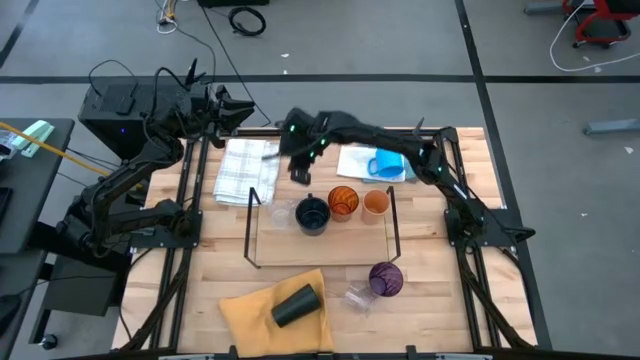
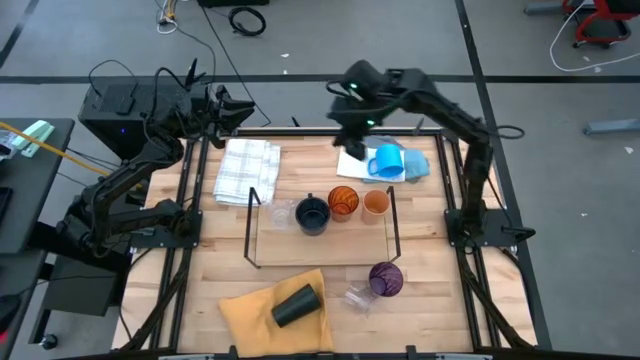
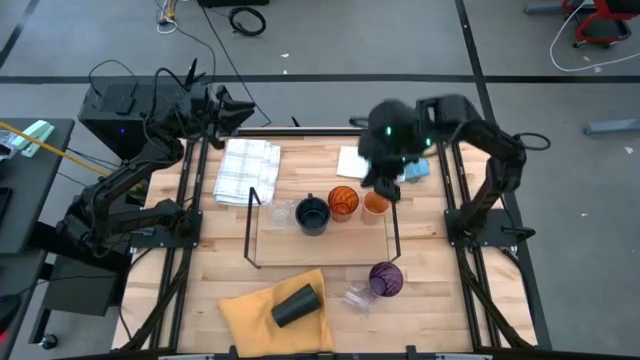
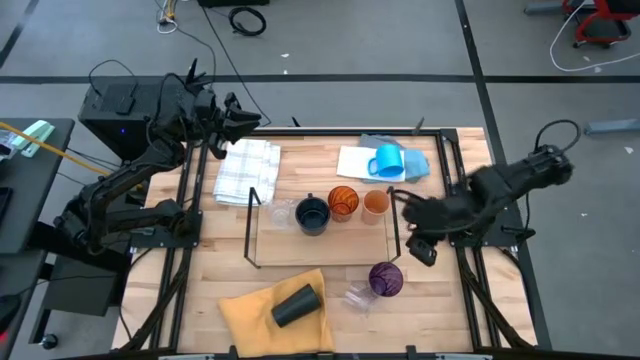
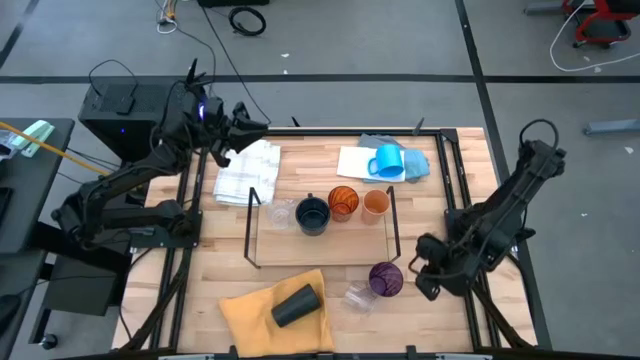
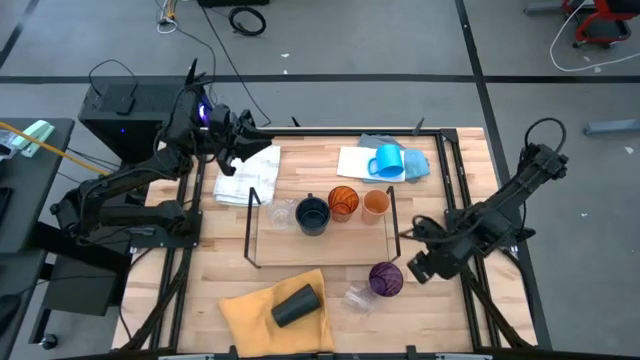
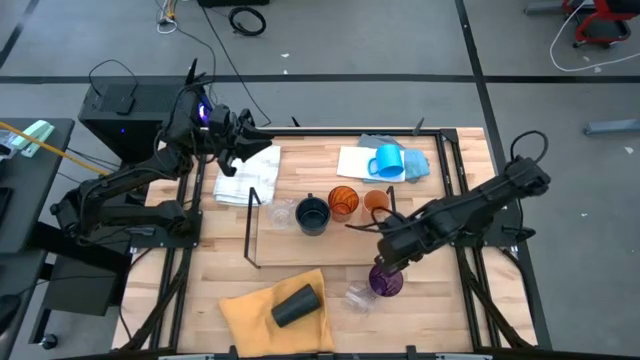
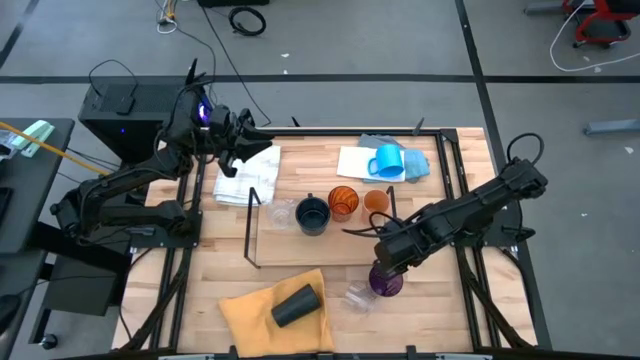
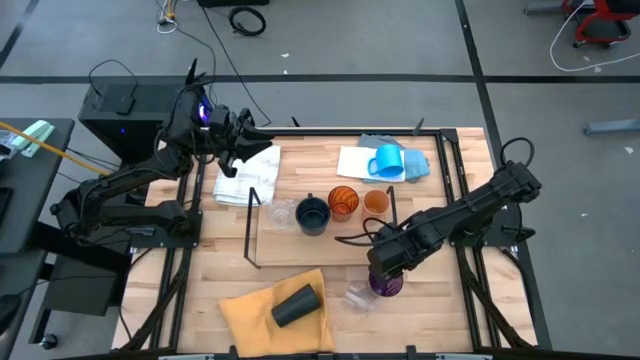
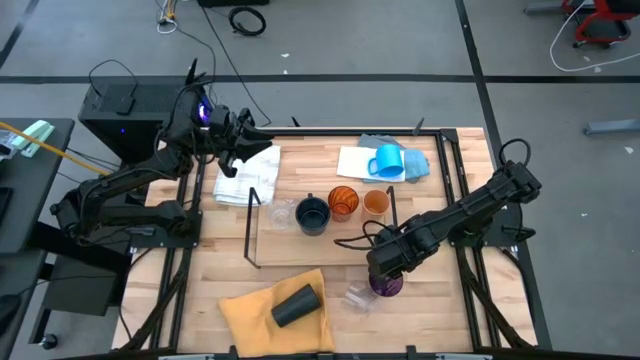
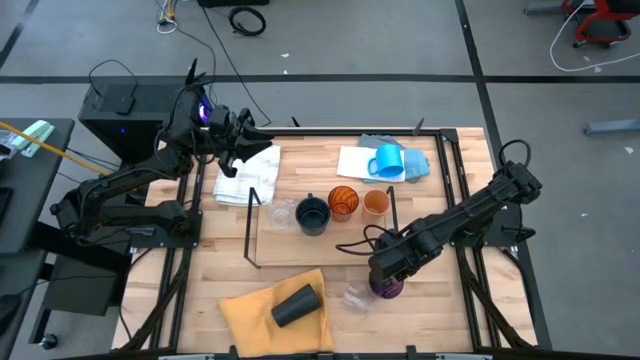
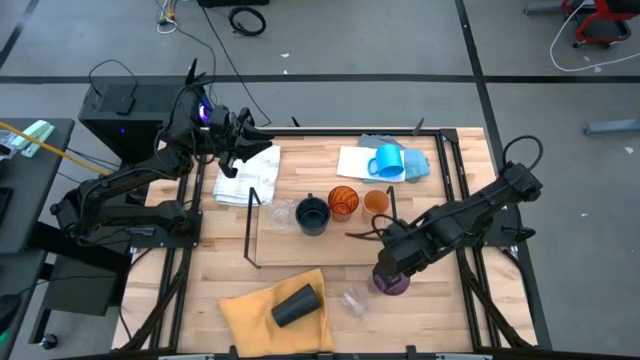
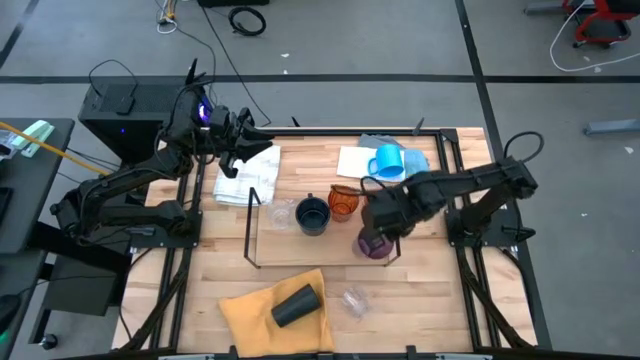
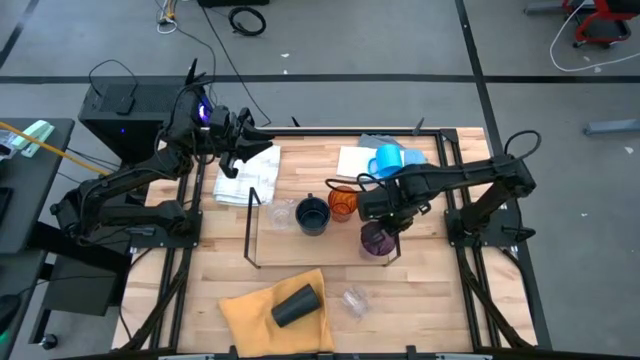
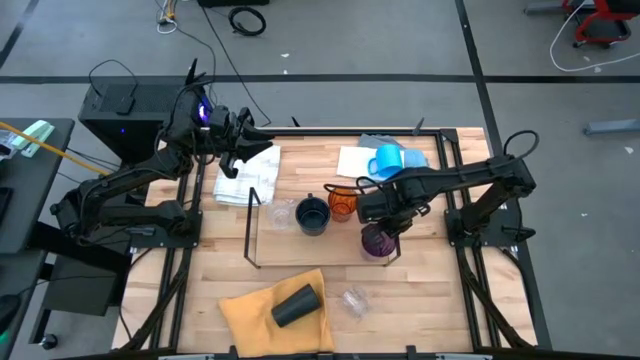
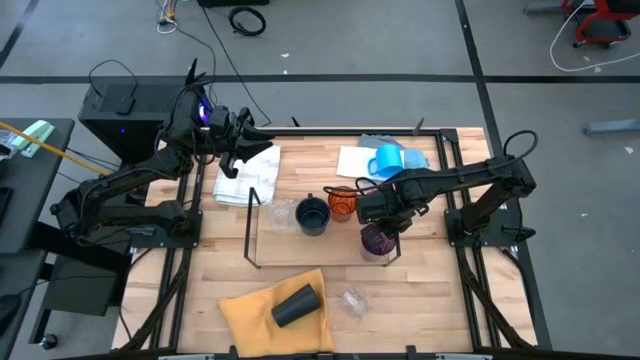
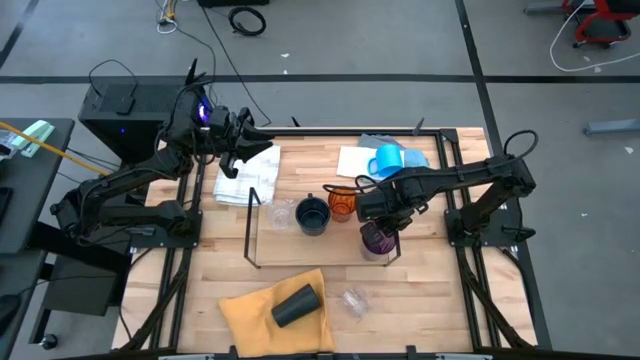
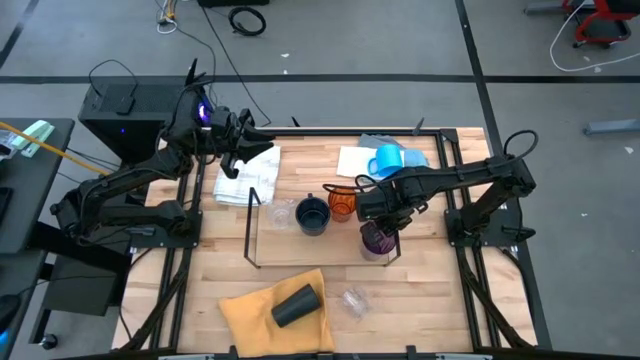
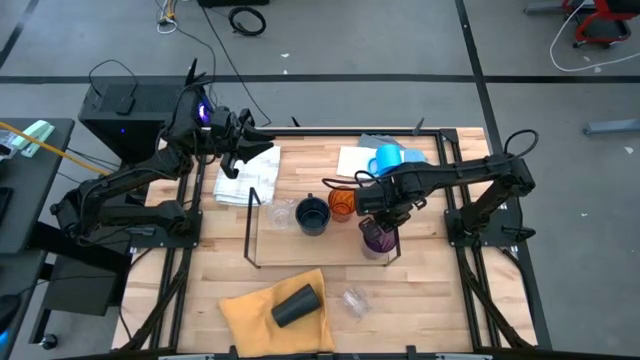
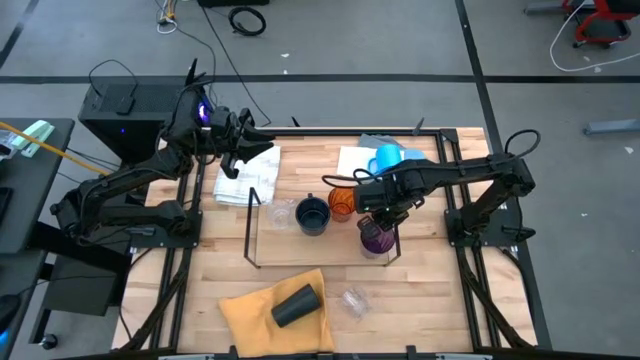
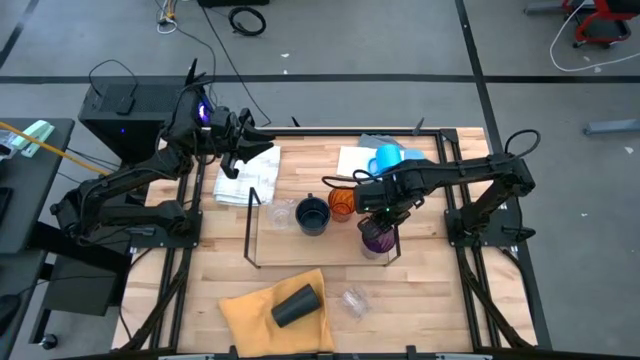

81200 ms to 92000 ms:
Task: Stack small to large cups/mugs on shelf
Put the purple cup on the shelf aligned with the orange cup

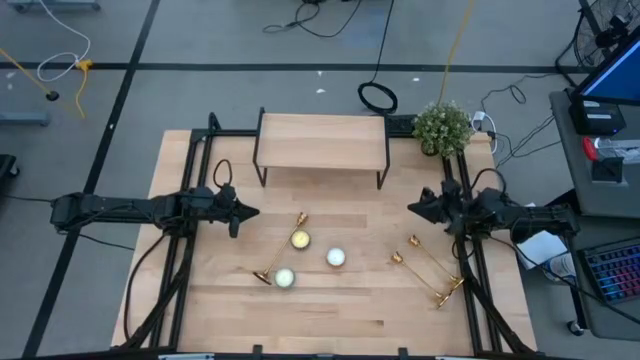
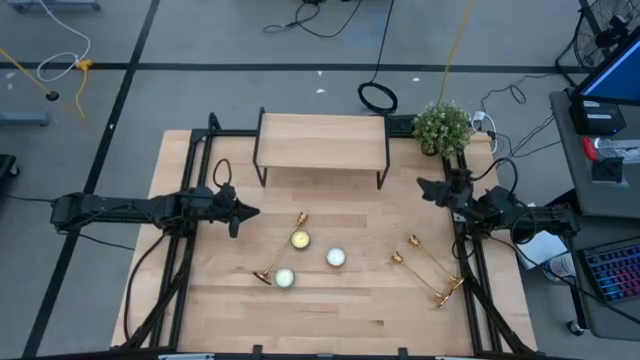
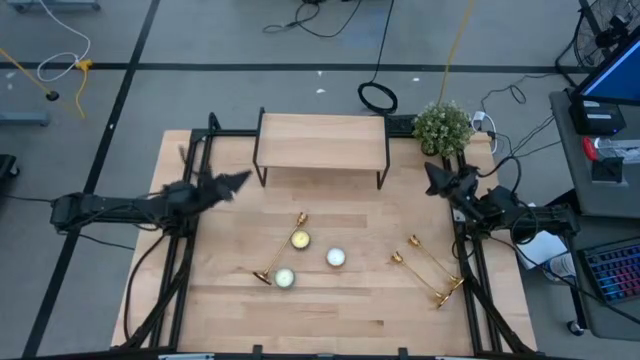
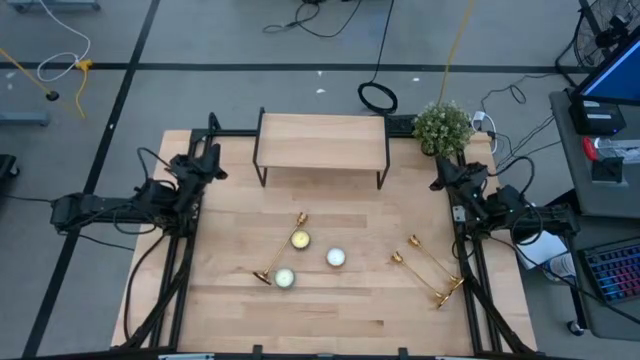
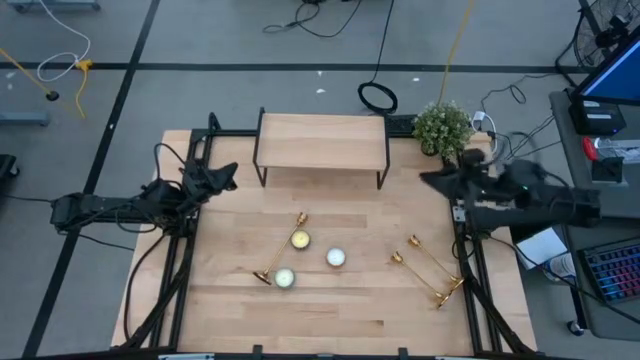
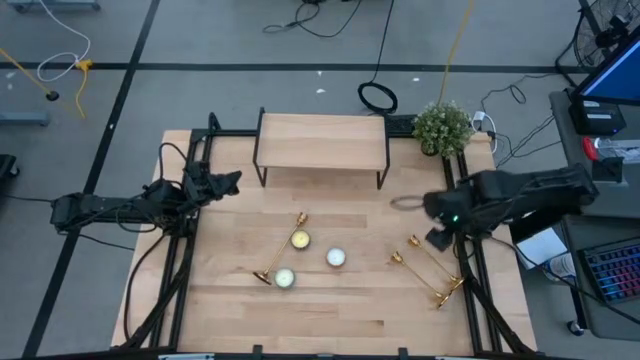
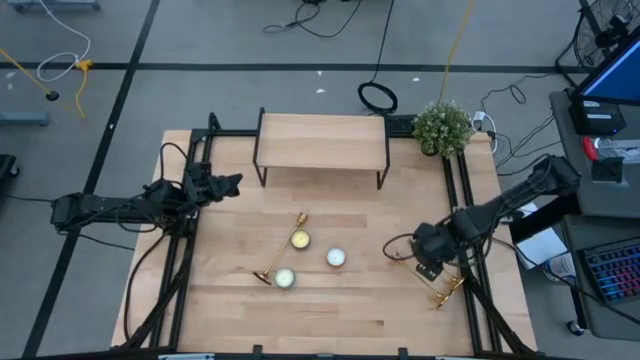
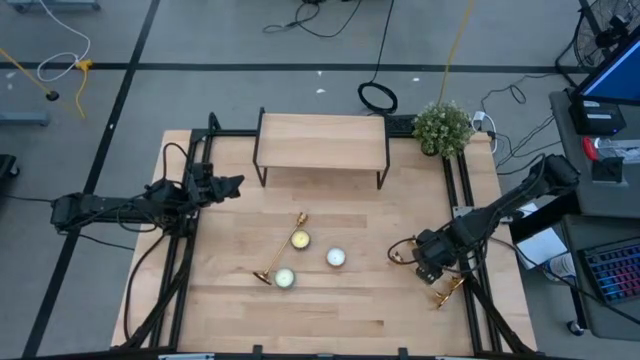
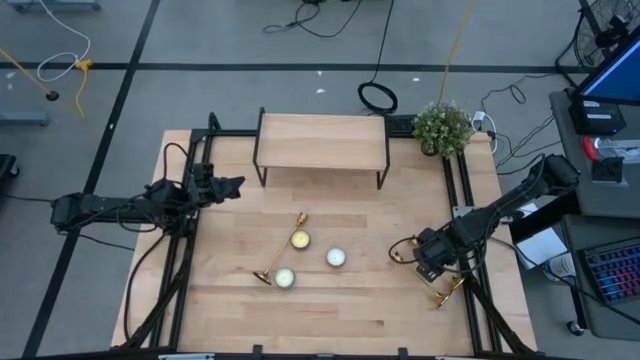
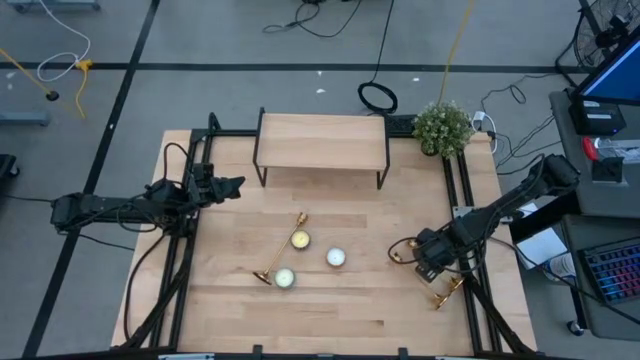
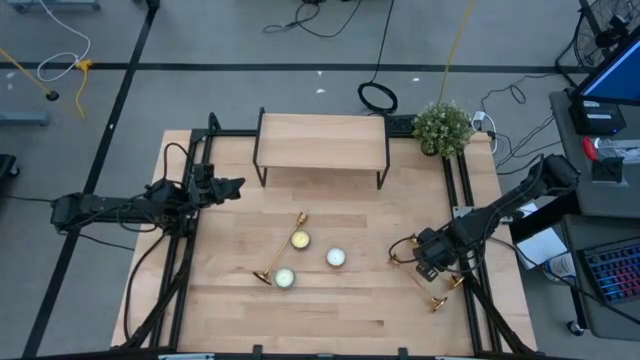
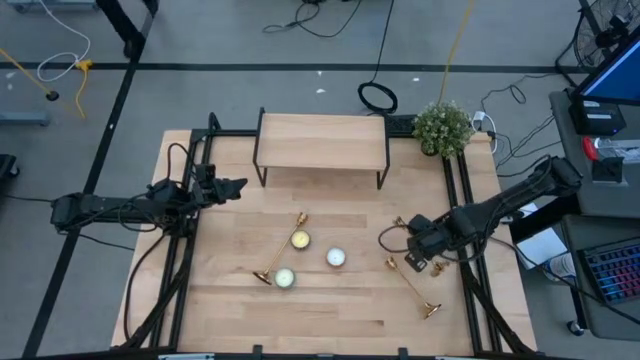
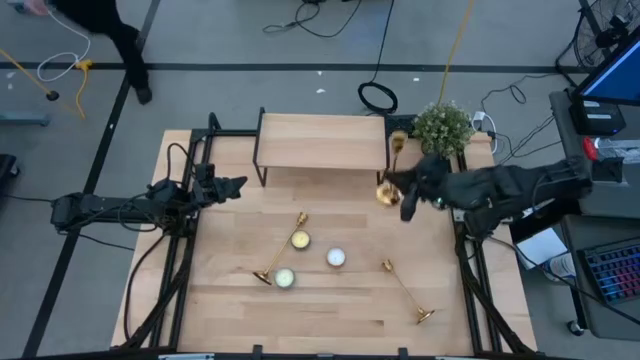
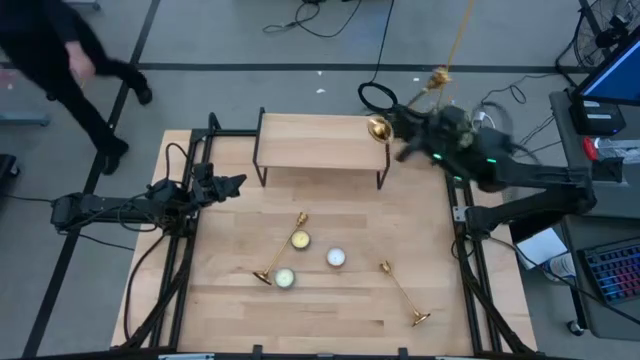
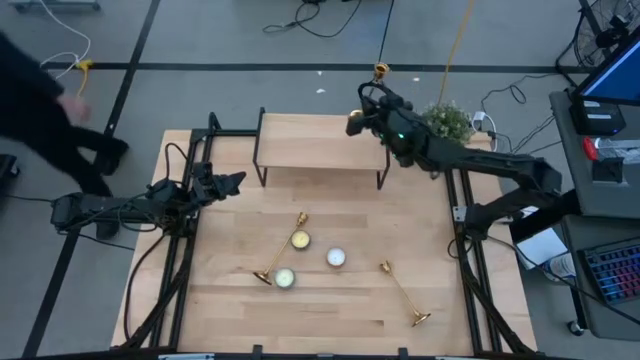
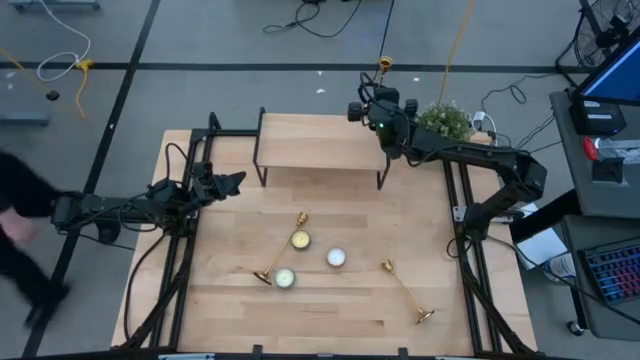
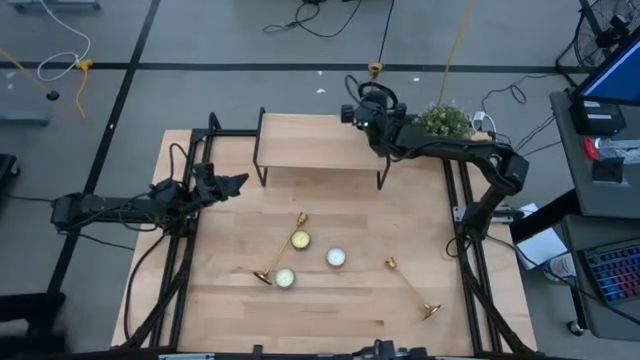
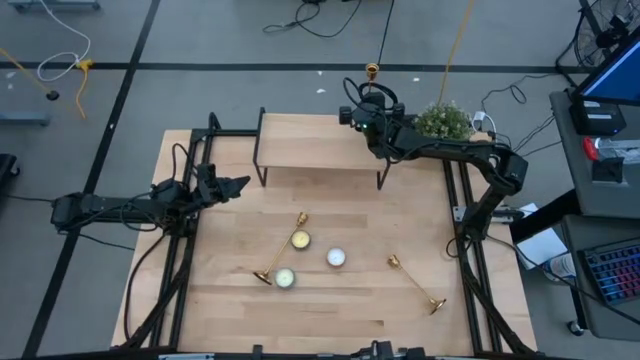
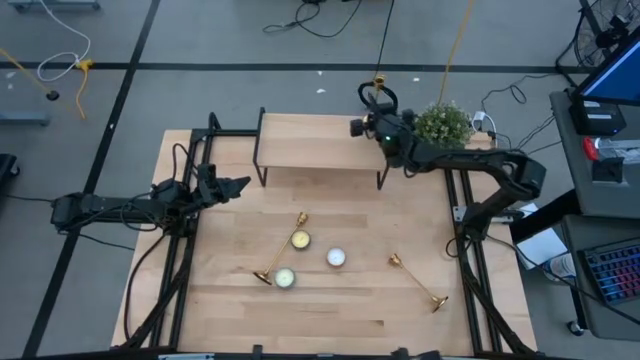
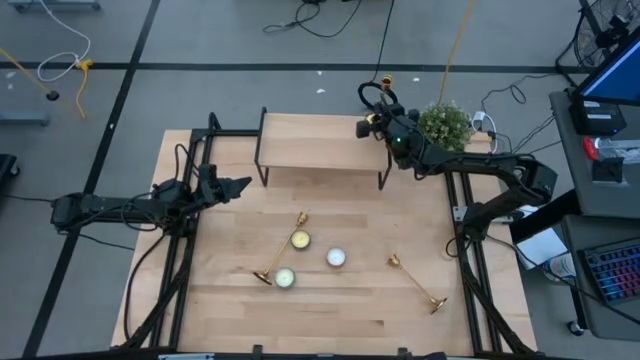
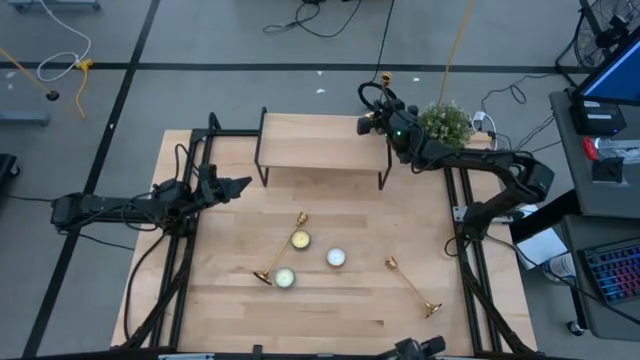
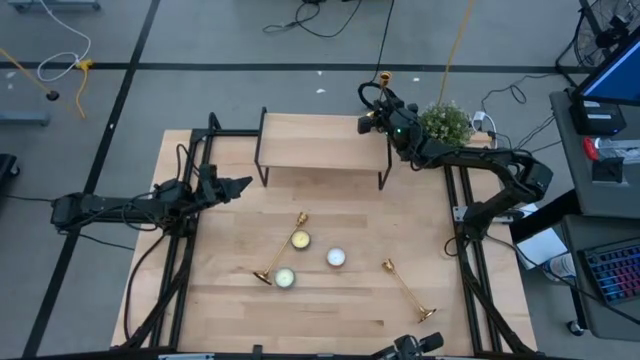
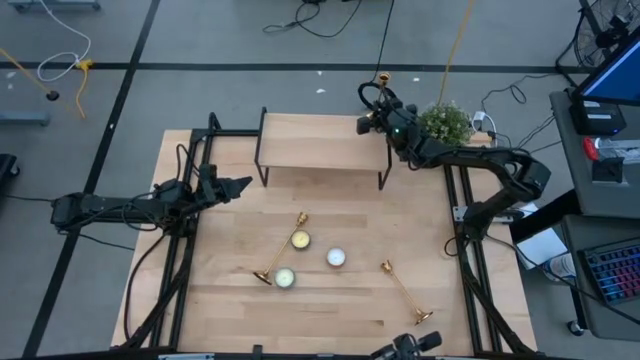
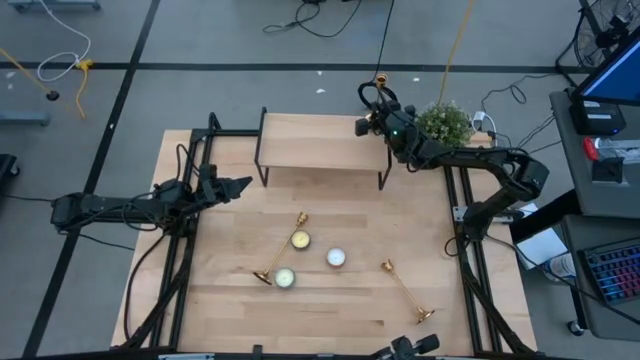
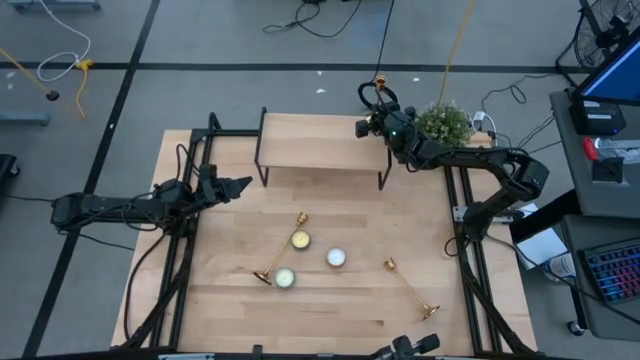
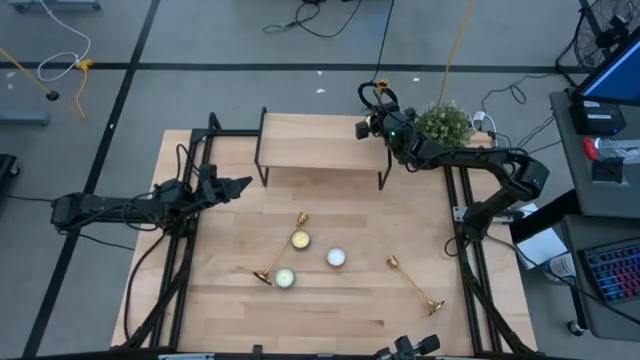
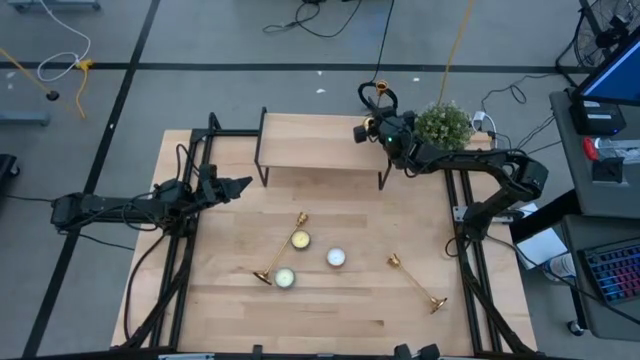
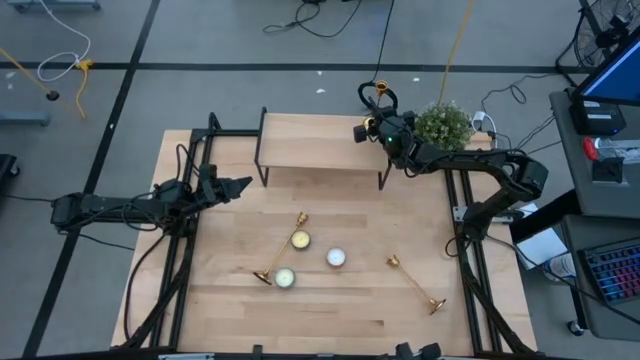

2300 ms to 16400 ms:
Task: Pick & Place candle stick holders
Put the right candle holder on the shelf
